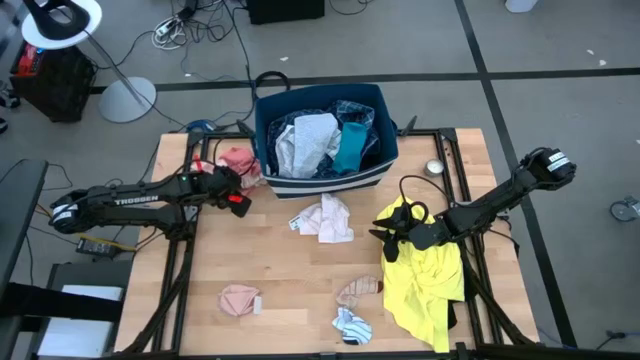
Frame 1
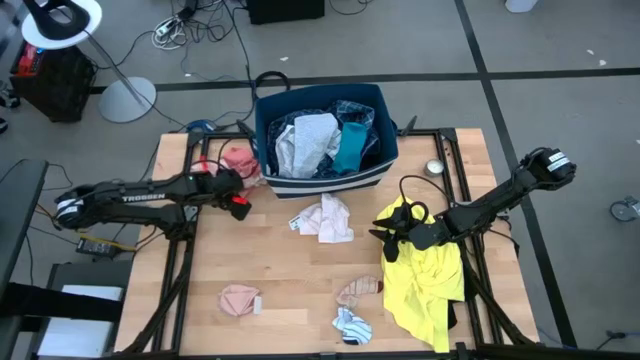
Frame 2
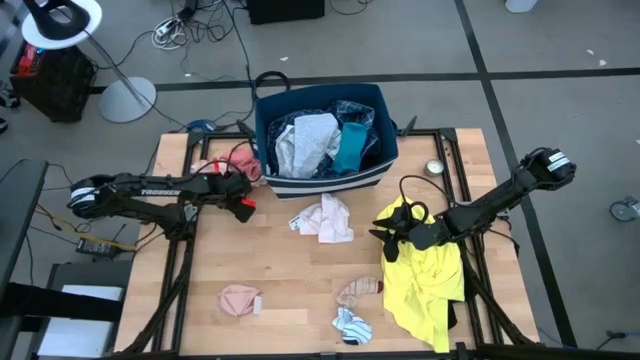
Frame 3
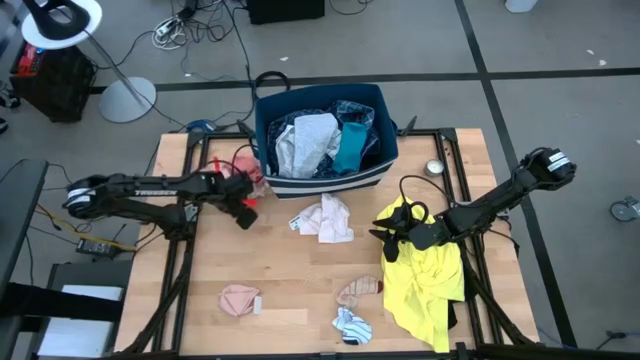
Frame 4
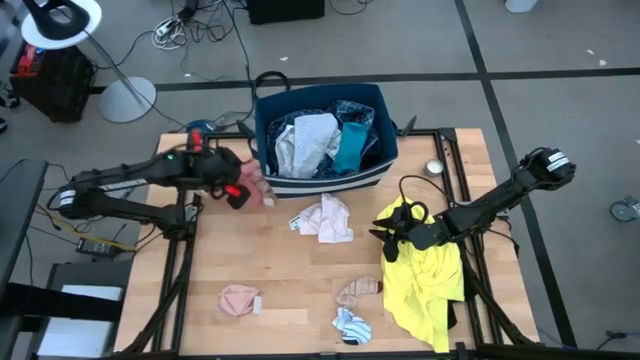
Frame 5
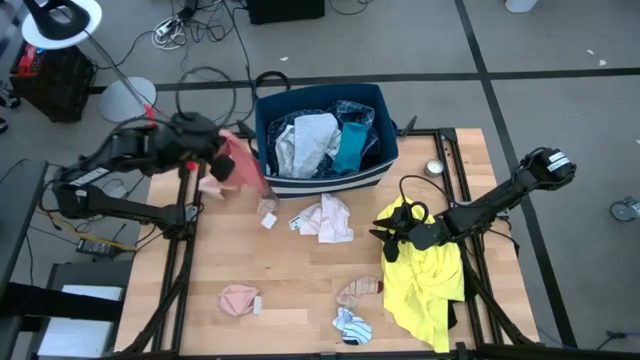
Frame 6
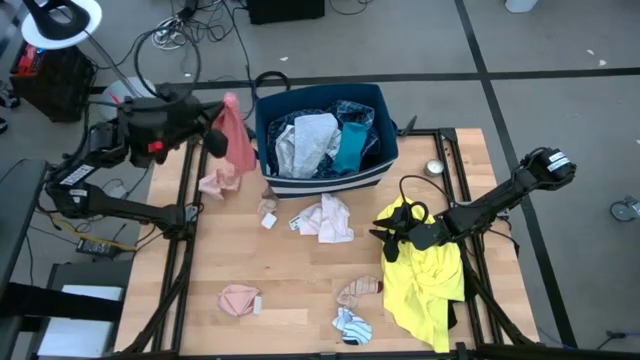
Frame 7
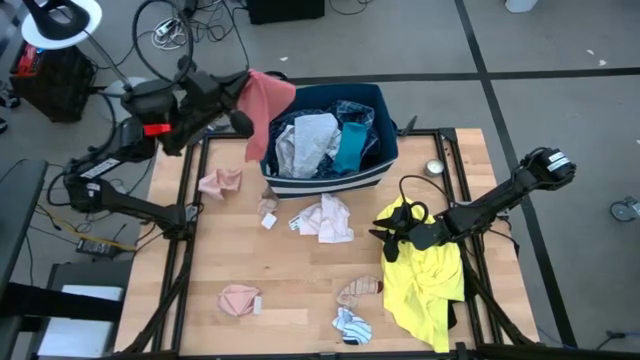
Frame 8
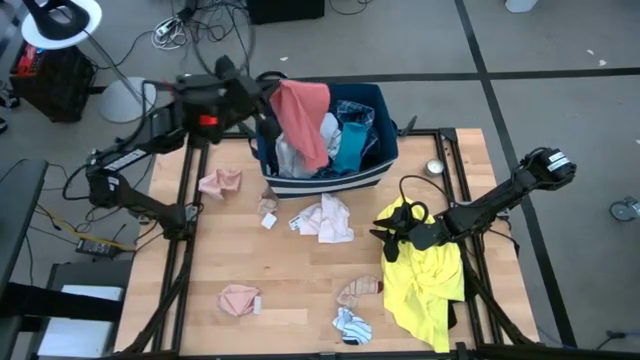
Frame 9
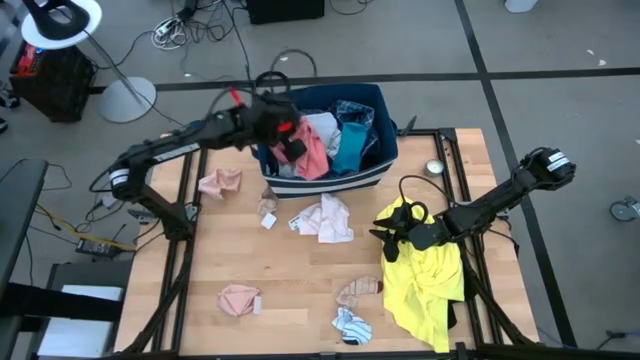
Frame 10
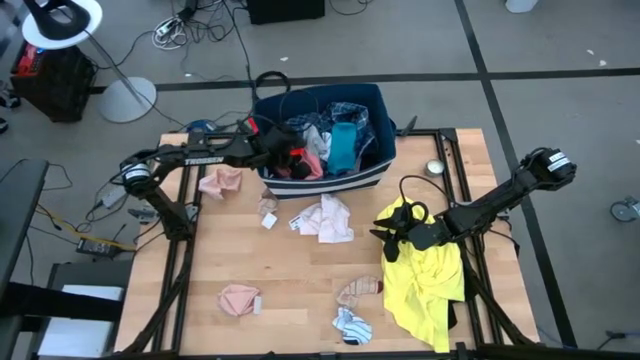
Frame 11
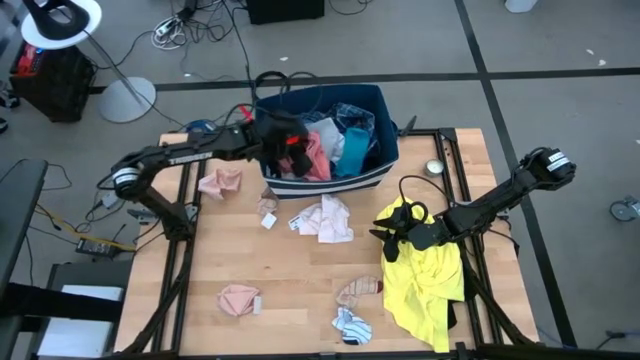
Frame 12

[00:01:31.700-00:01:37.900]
Task: Sort clothes
Put the light orange underwear into the blue bin

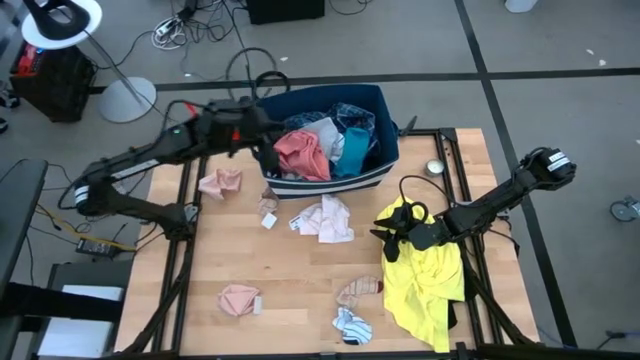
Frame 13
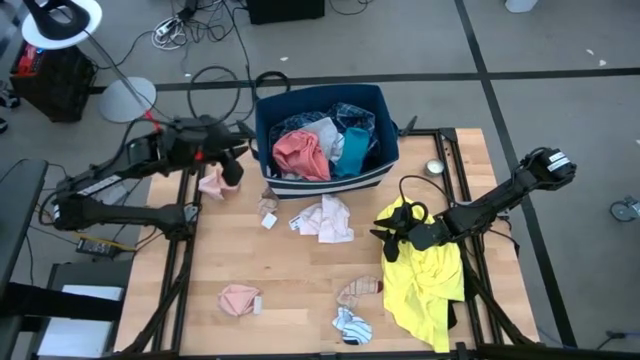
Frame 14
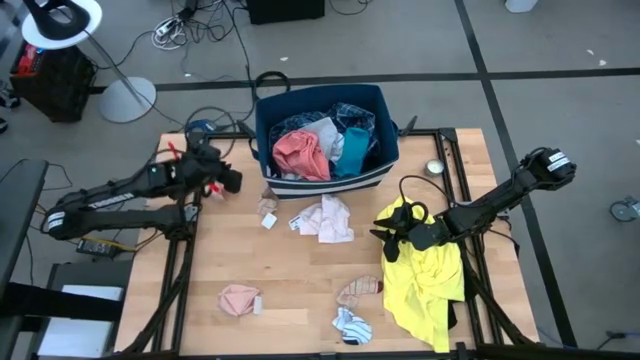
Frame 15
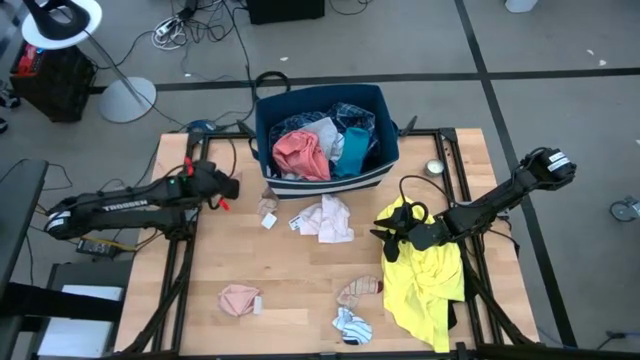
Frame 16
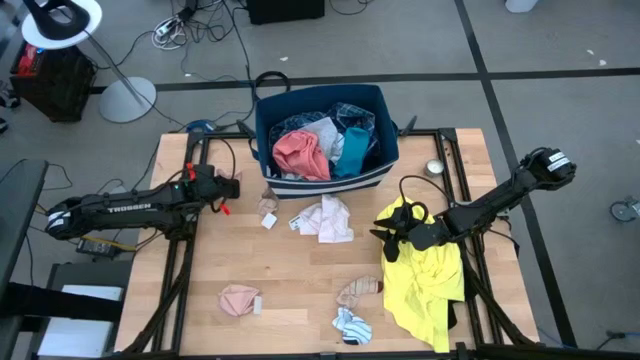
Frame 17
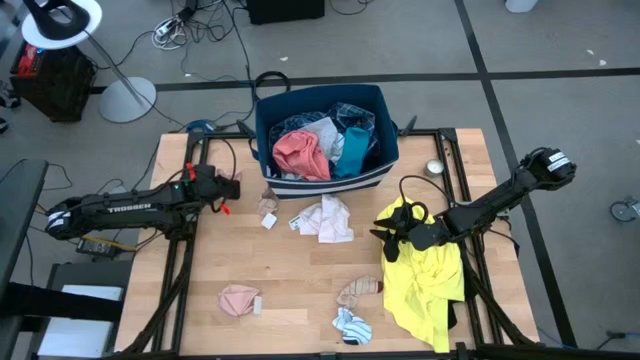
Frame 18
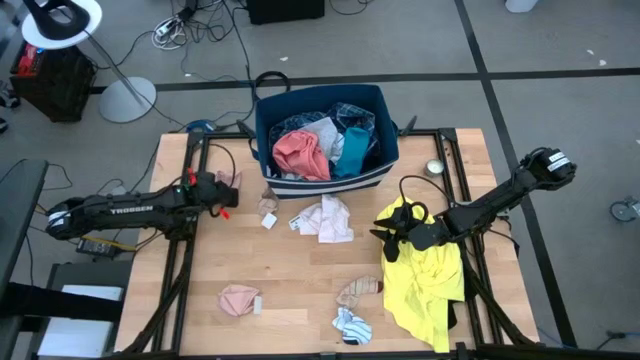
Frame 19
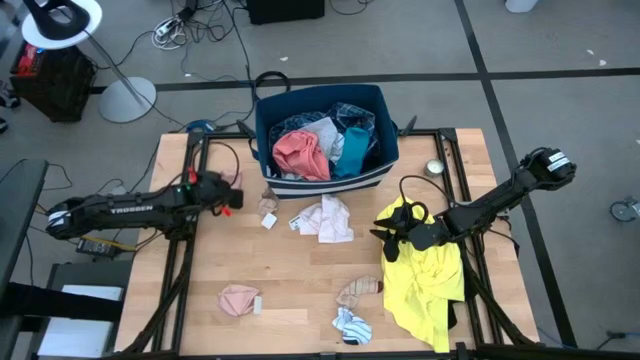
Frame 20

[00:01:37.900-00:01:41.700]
Put the top pink sock into the blue bin

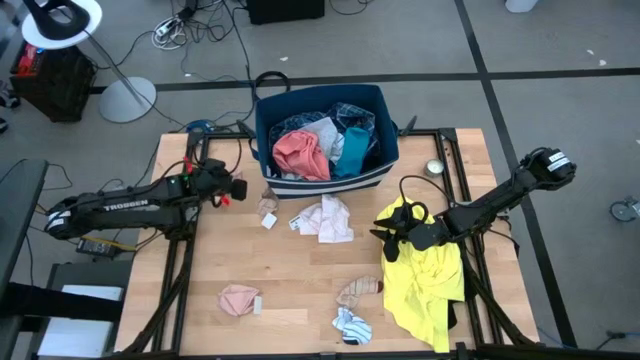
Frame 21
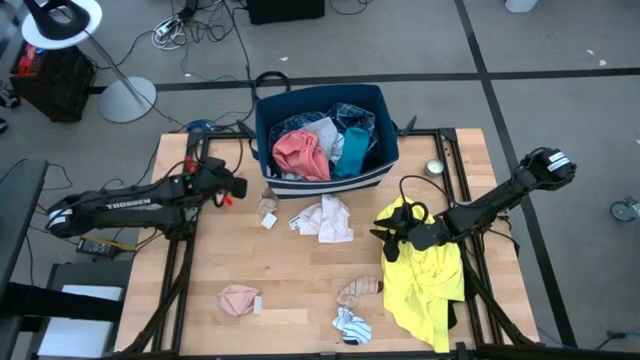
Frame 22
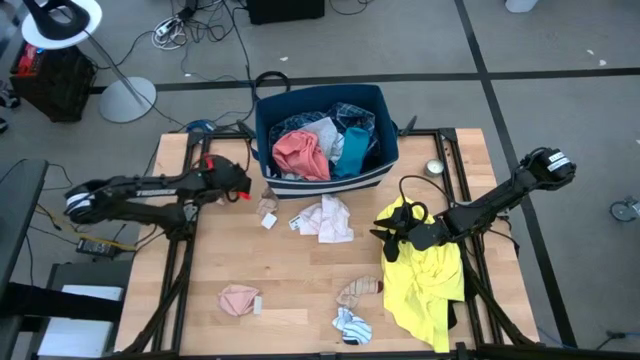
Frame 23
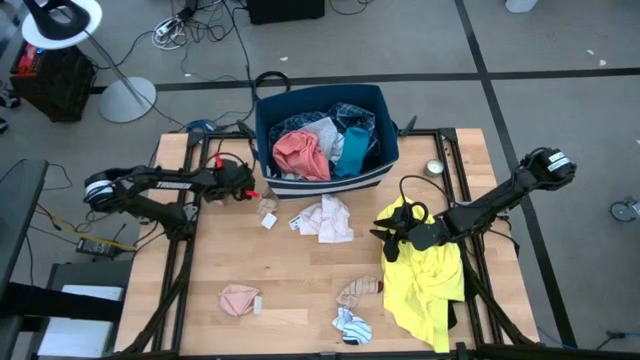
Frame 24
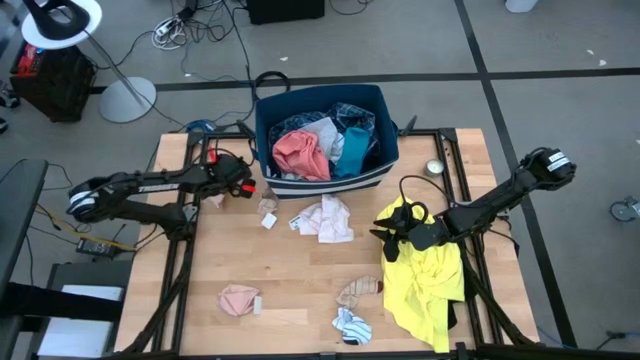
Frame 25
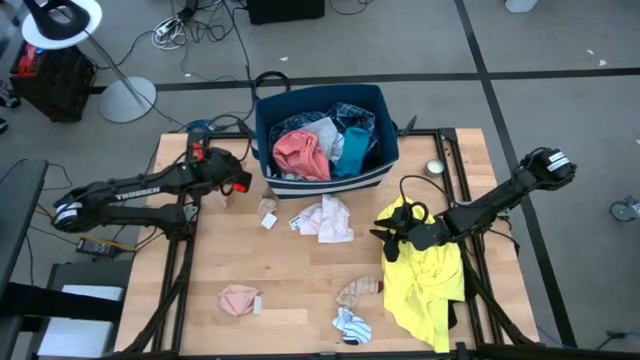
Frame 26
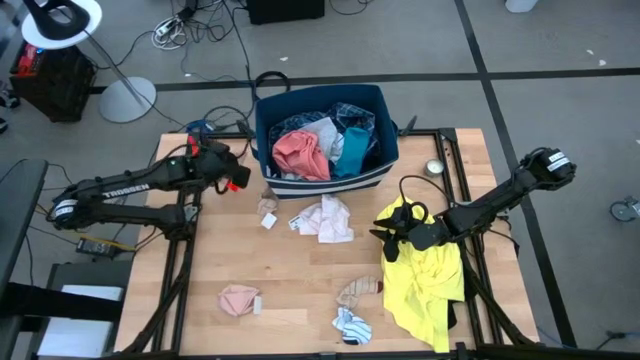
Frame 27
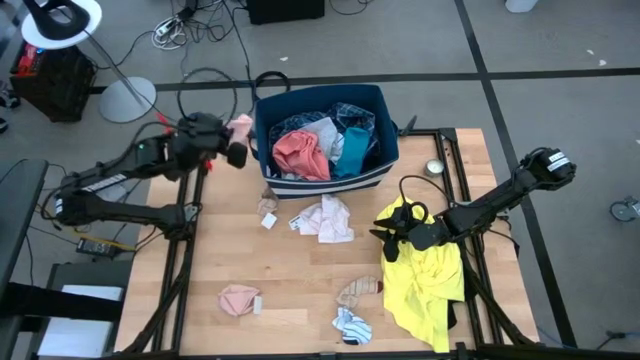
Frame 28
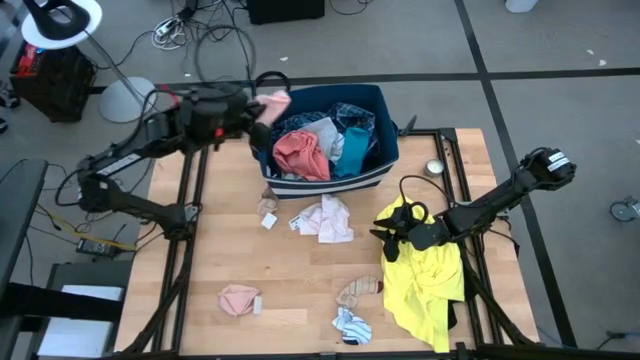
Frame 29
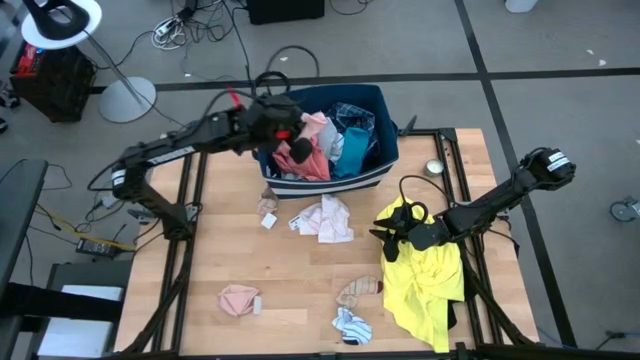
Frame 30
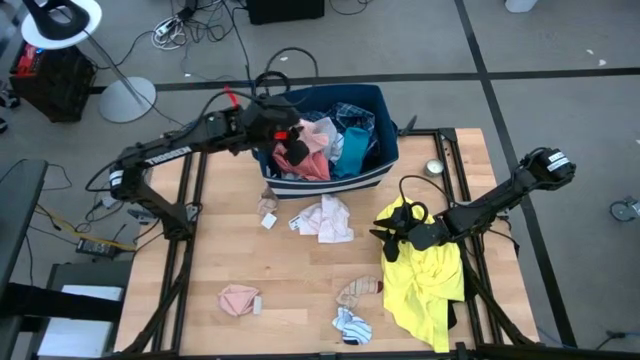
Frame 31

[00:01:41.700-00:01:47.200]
Put the top pink sock into the blue bin

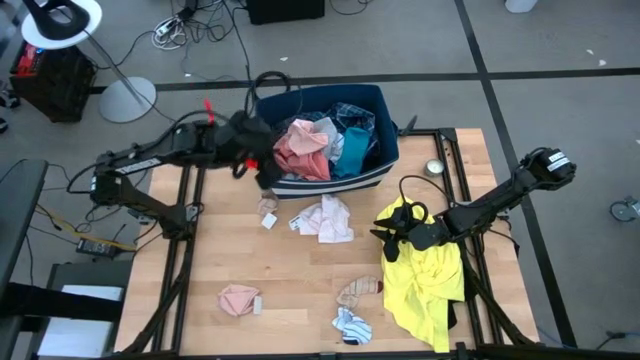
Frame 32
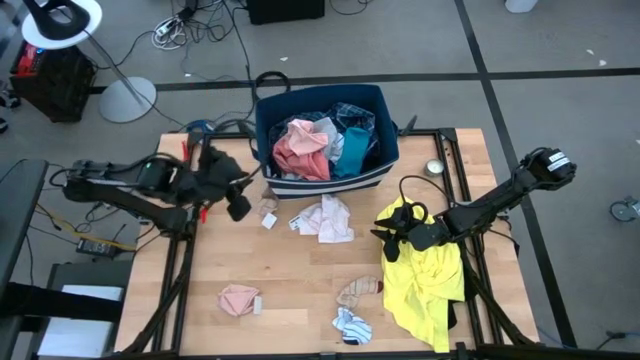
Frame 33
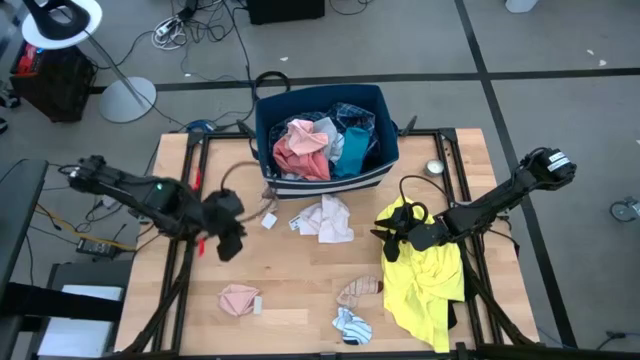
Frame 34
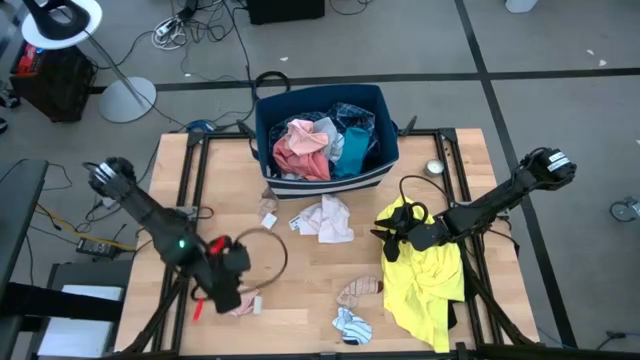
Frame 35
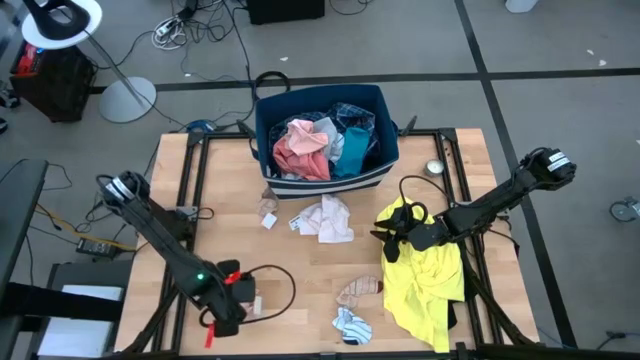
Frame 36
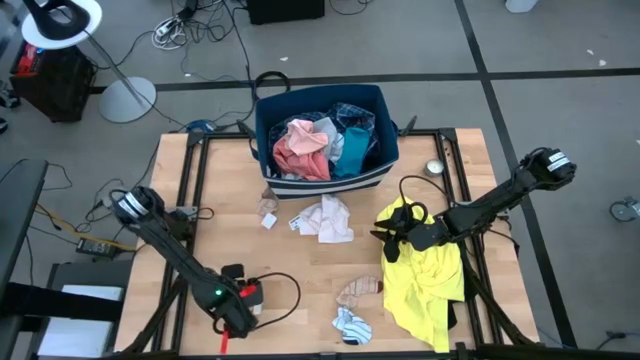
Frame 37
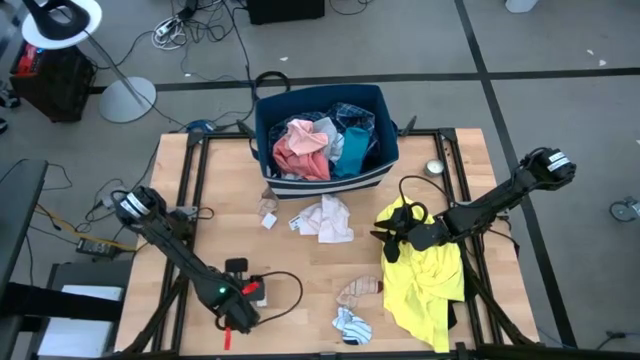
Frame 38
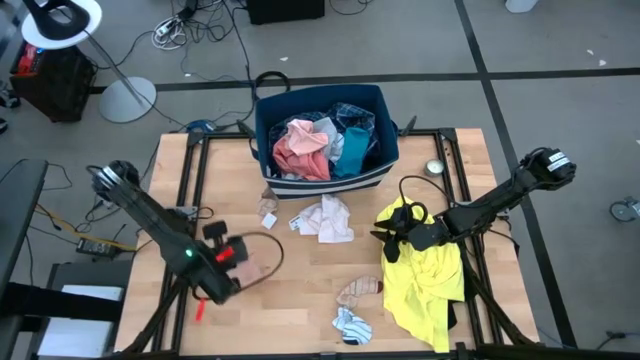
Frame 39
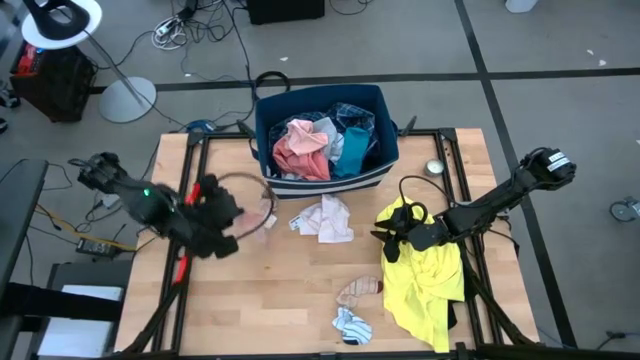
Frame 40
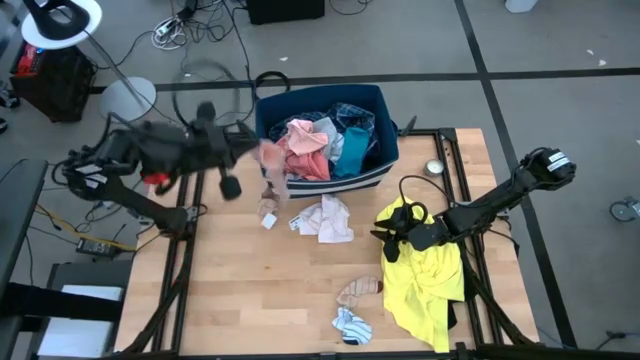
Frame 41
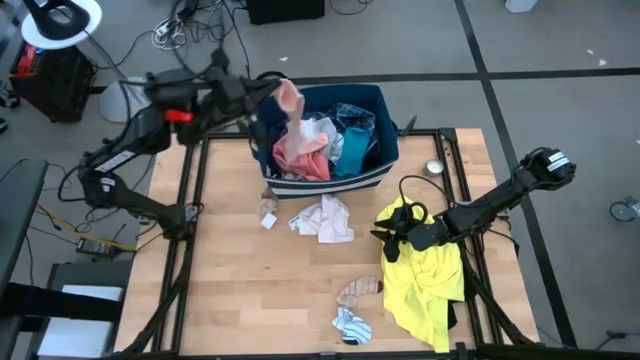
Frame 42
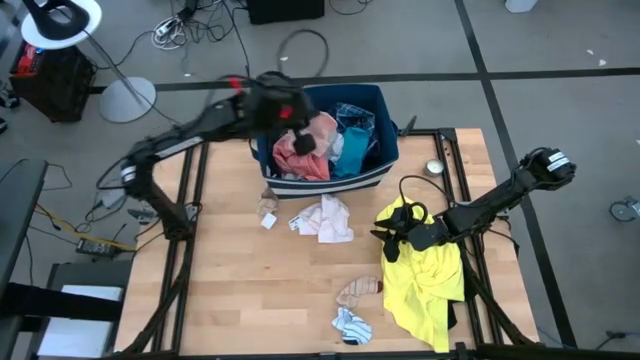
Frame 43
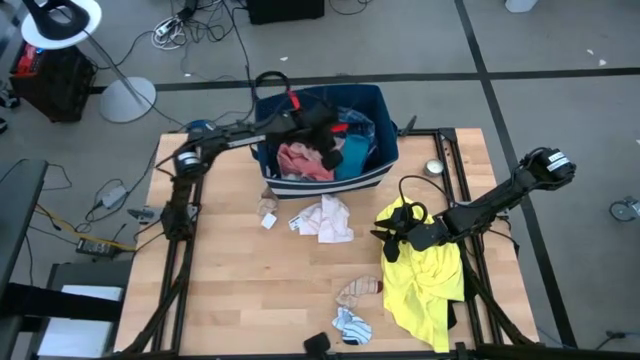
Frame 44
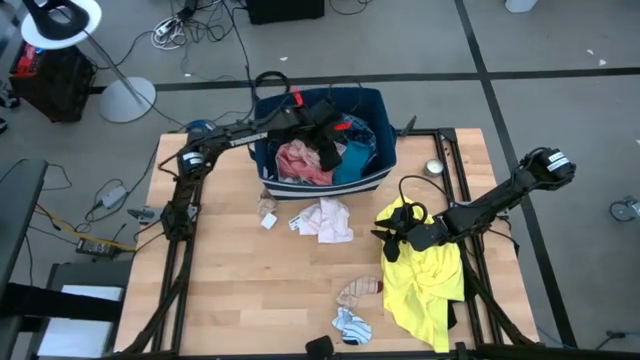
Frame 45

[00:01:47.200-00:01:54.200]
Put the pink sock into the blue bin
